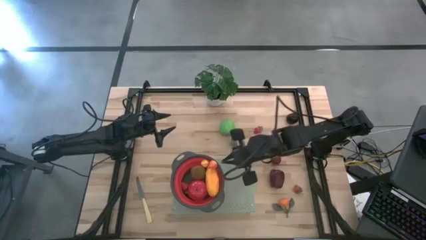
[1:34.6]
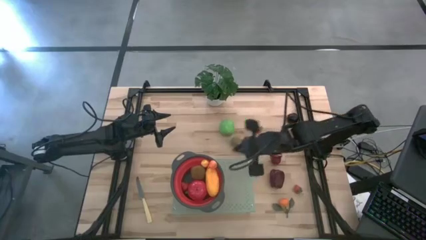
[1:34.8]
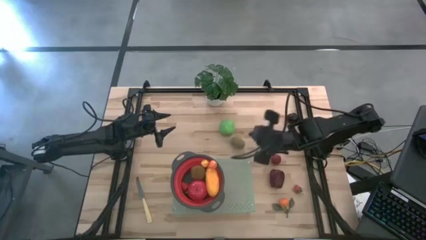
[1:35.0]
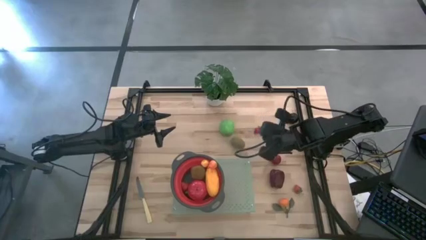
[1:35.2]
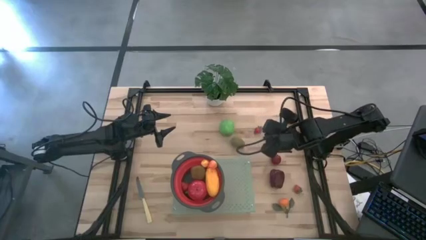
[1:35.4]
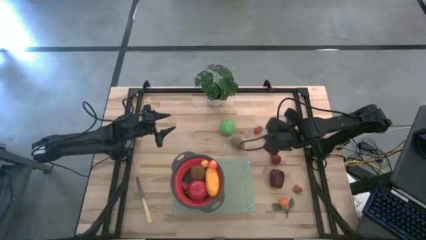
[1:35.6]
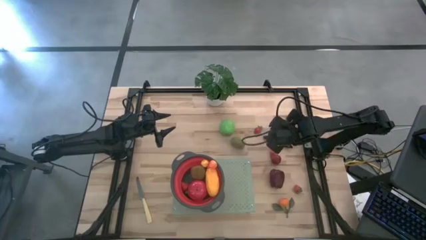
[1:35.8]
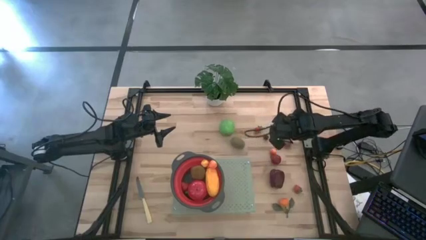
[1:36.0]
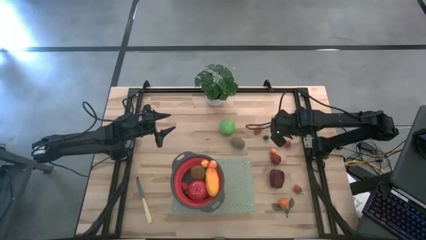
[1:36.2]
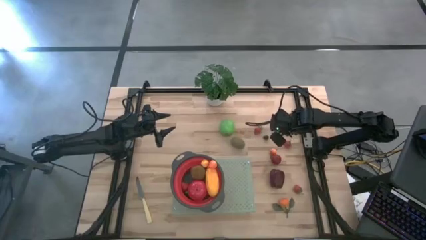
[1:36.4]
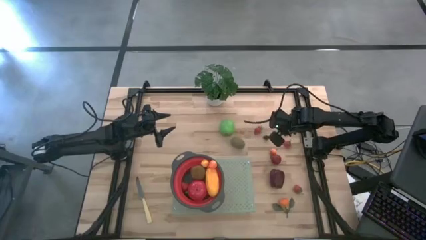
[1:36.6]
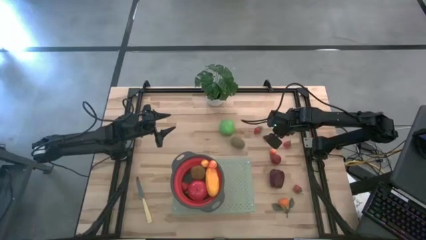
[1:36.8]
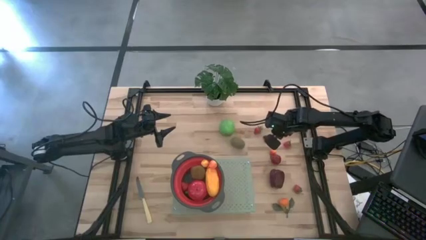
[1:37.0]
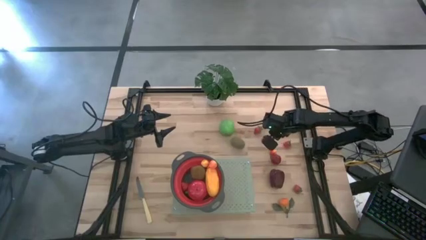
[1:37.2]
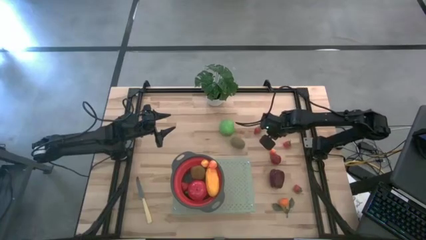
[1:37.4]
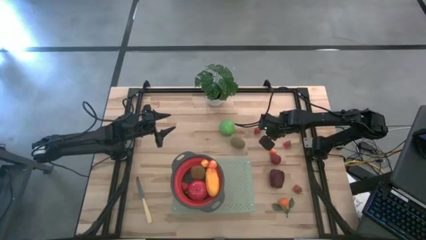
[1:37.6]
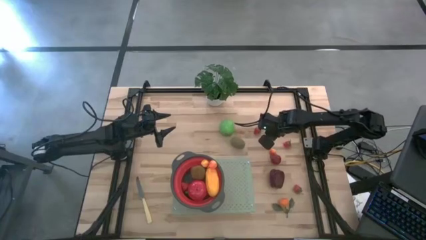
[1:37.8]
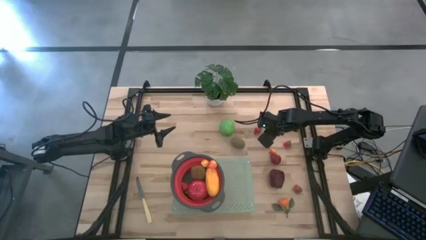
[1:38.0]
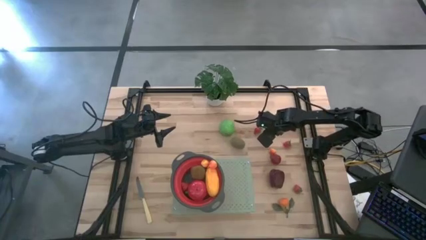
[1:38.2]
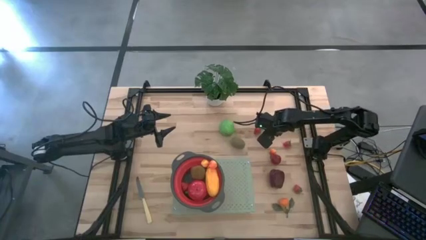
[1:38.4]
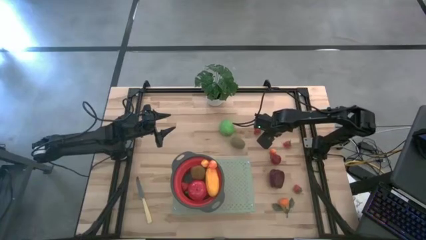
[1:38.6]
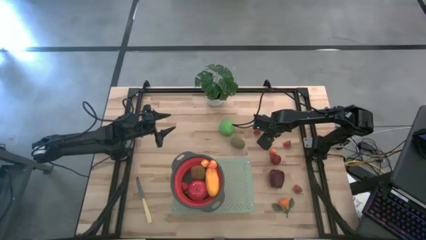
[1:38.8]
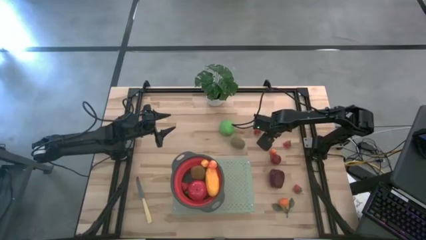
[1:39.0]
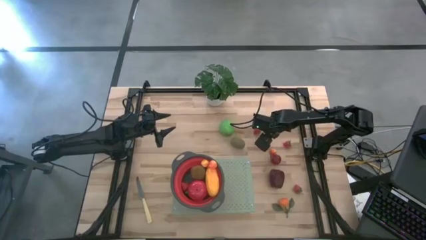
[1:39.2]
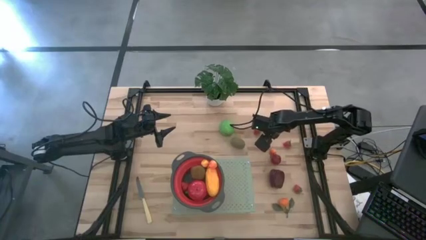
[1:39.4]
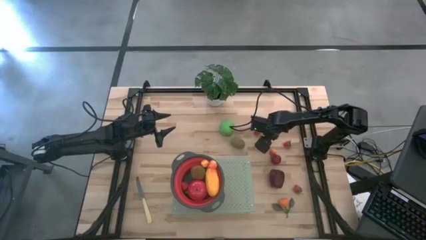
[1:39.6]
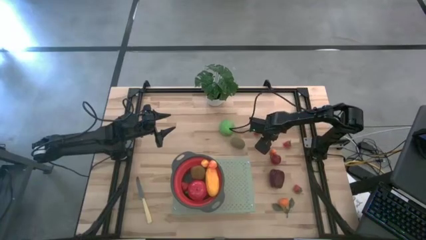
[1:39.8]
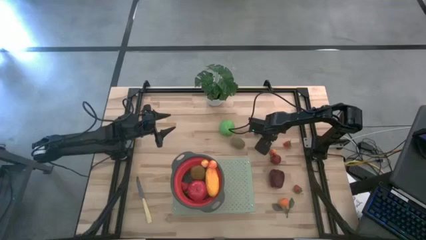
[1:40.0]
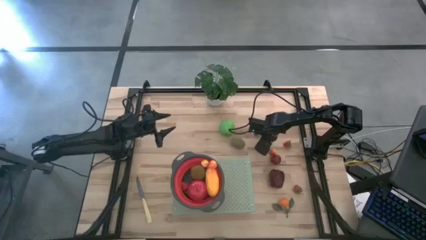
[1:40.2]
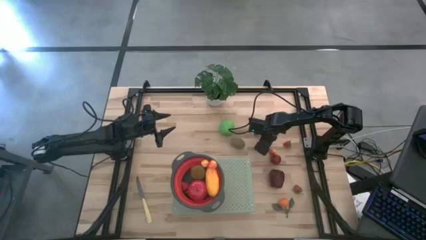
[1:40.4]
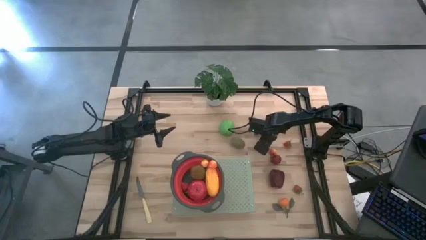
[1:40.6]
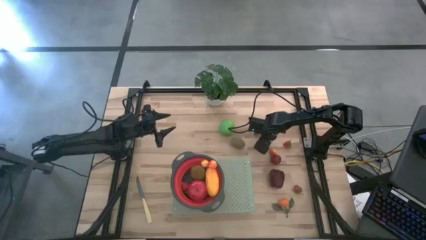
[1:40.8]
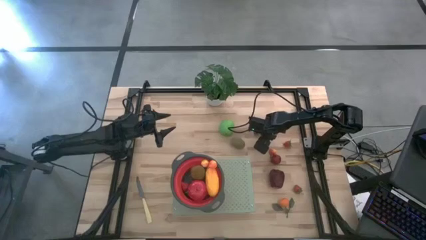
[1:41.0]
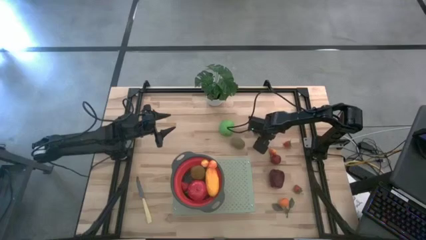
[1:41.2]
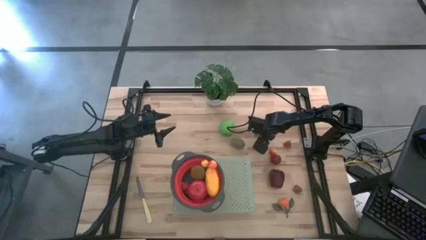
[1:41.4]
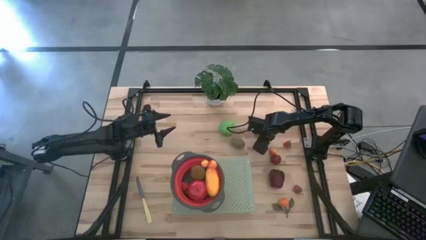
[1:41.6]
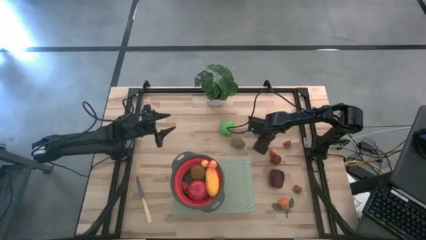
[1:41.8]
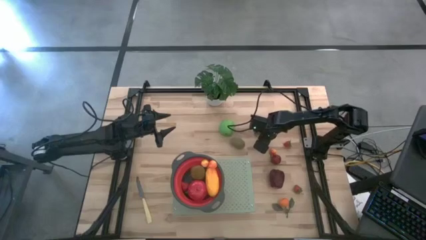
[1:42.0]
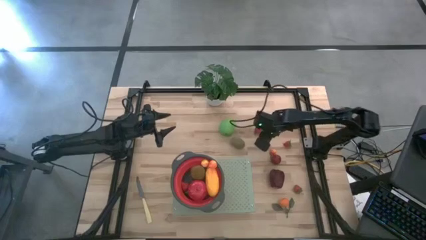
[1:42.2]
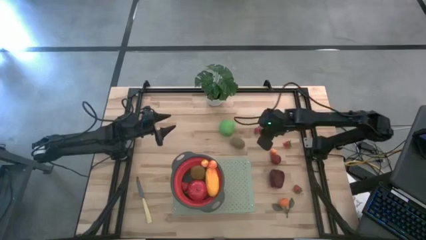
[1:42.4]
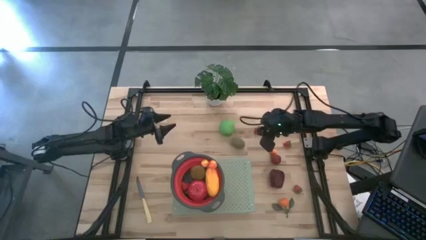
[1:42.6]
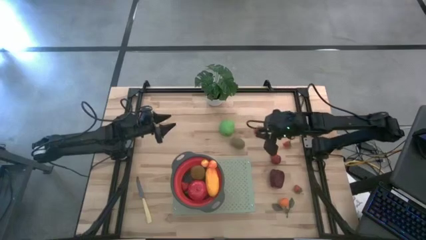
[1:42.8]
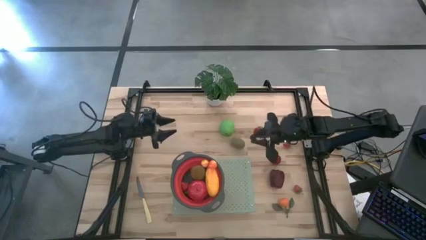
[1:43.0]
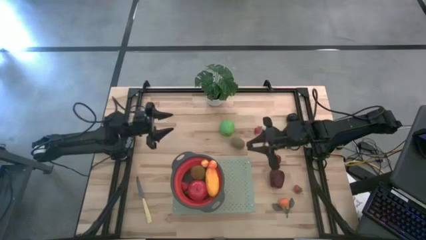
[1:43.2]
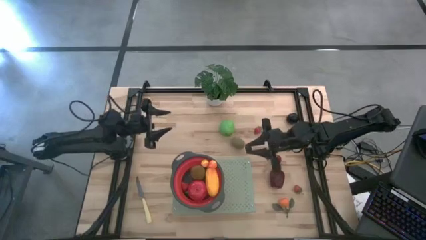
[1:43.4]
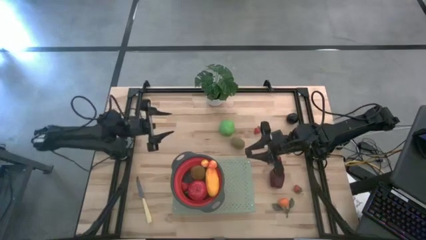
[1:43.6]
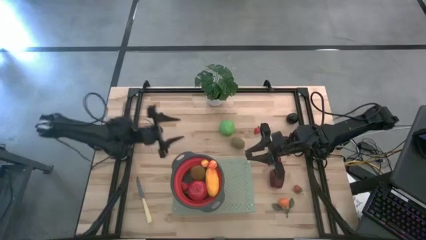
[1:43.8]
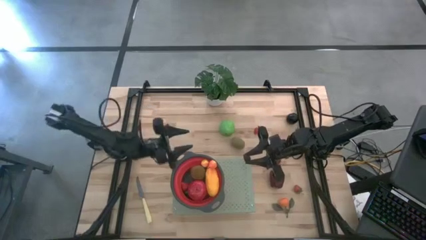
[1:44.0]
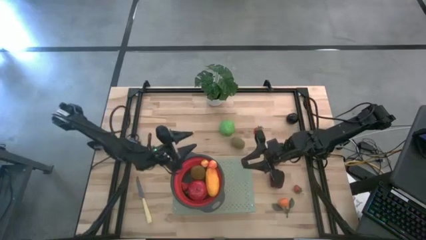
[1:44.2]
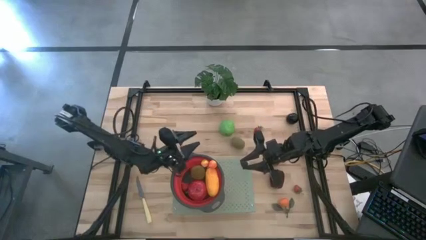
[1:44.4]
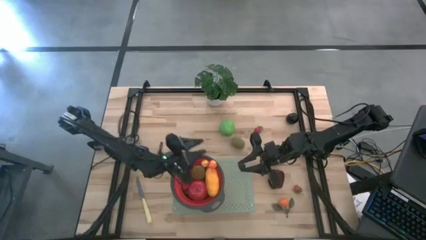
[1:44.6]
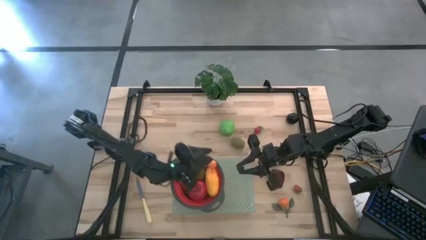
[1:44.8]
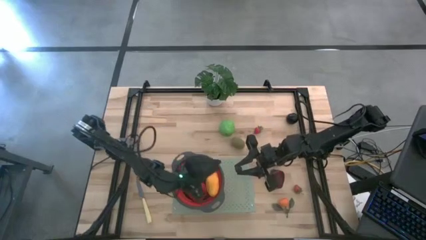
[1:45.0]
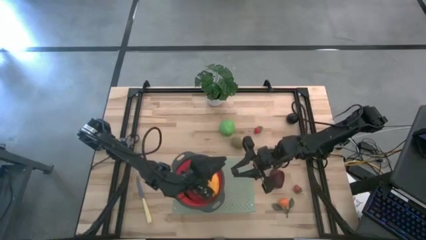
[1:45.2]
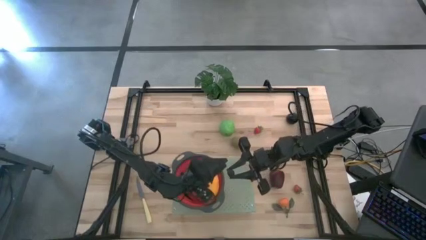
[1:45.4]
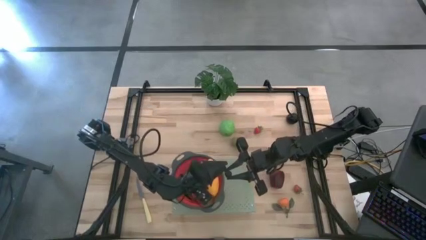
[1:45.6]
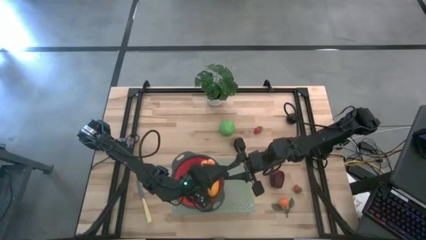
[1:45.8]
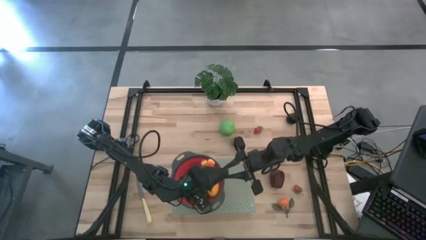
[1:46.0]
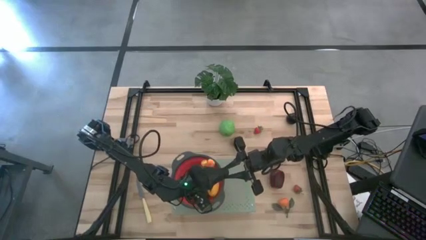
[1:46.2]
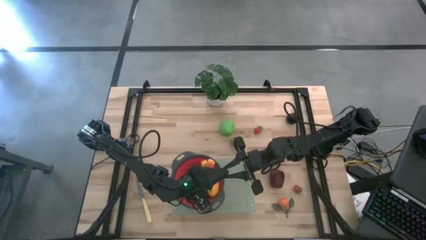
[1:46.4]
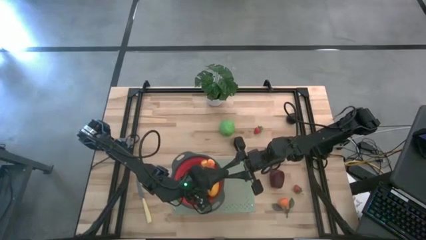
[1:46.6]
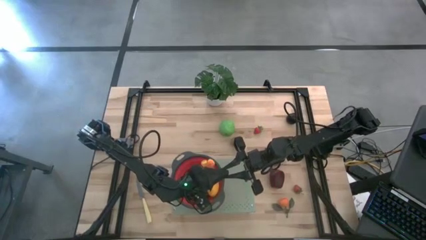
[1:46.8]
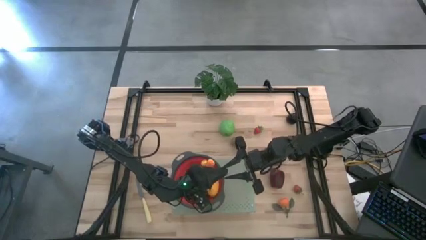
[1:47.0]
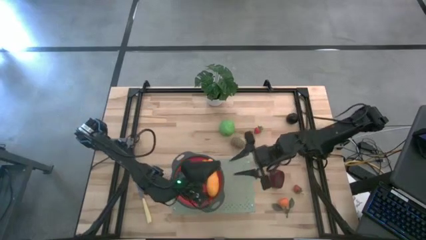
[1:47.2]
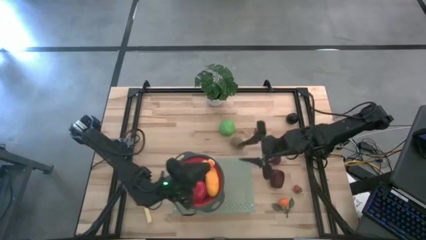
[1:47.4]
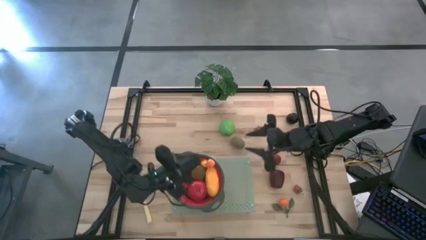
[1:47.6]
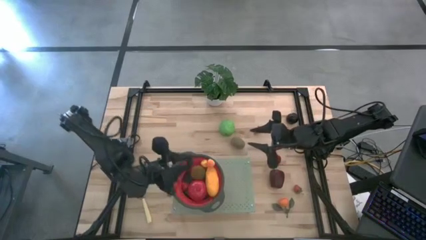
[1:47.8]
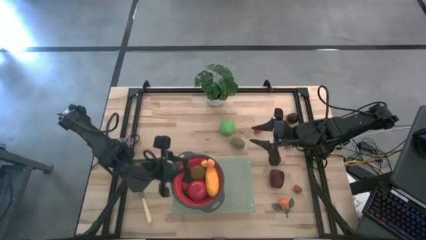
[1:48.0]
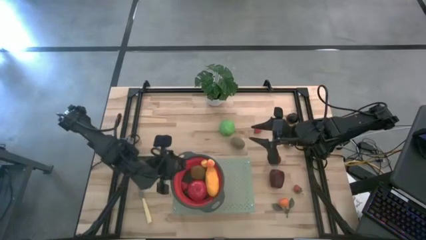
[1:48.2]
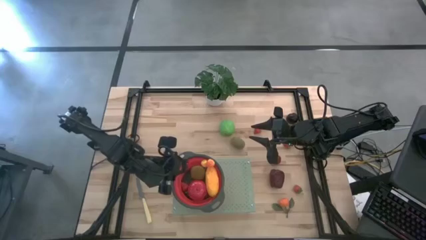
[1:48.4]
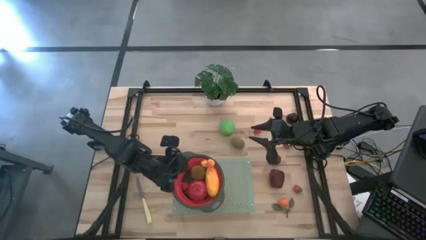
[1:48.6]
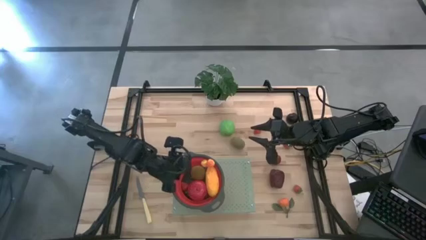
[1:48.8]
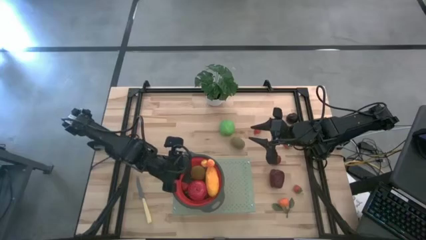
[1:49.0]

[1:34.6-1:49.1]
Task: Pick & Place Fruit
Put the blackberry into the red strainer

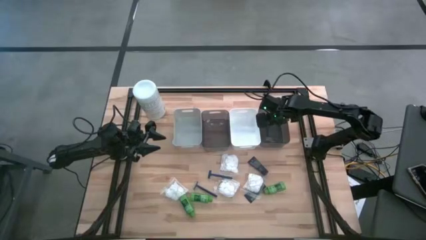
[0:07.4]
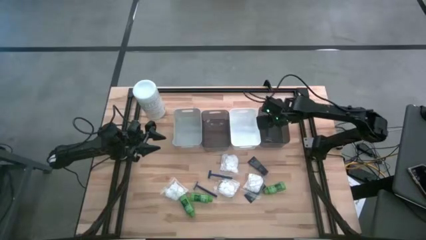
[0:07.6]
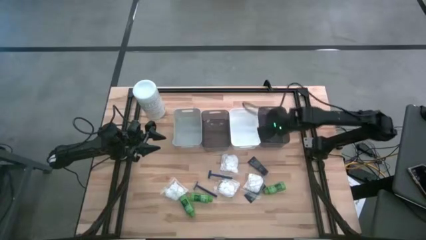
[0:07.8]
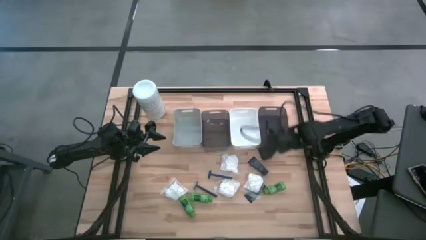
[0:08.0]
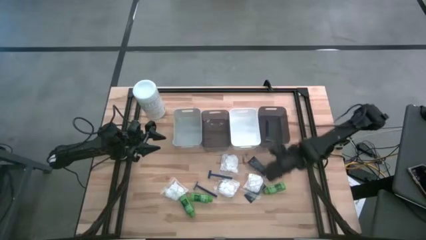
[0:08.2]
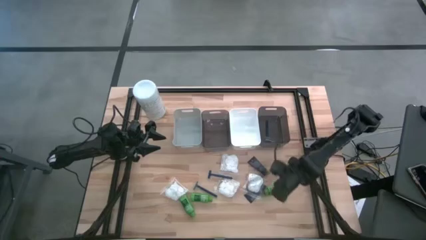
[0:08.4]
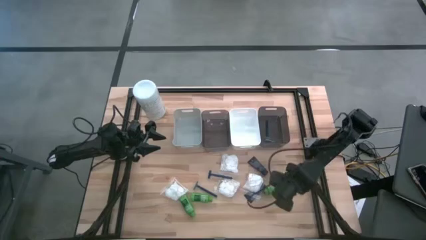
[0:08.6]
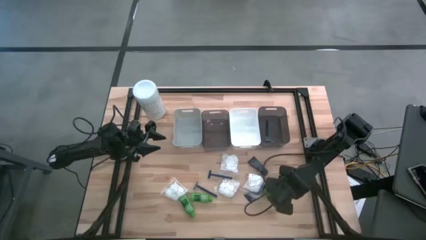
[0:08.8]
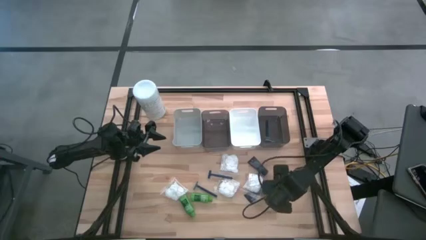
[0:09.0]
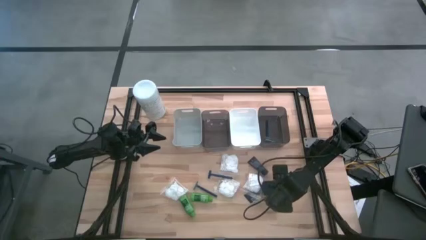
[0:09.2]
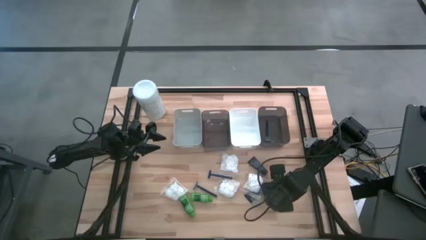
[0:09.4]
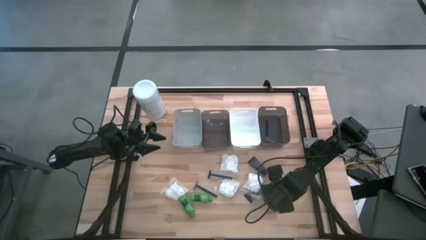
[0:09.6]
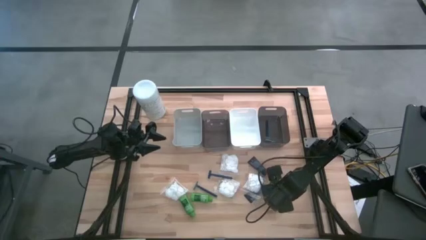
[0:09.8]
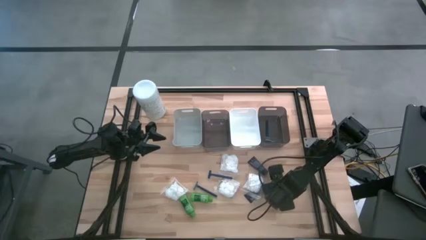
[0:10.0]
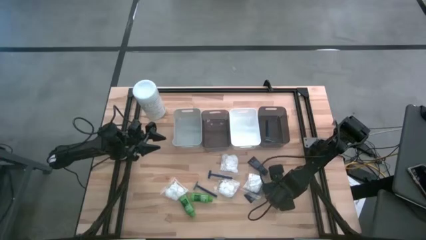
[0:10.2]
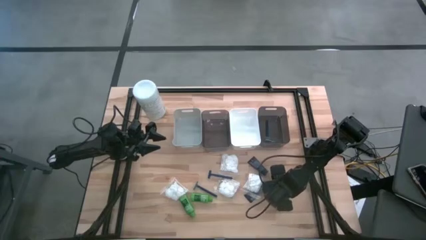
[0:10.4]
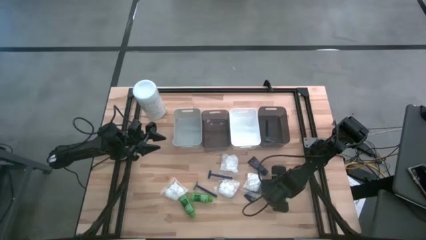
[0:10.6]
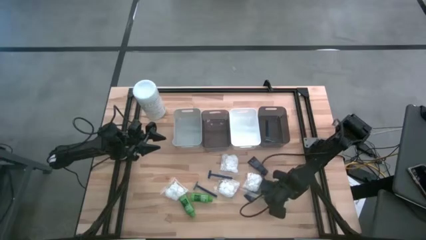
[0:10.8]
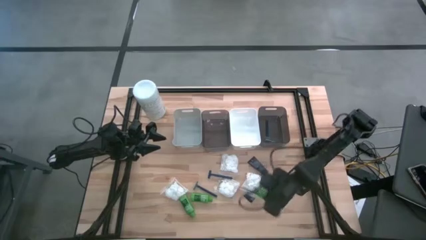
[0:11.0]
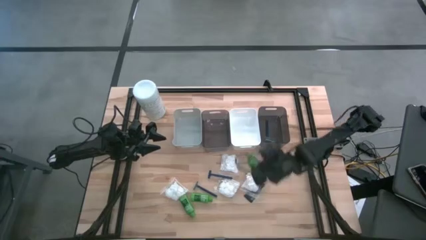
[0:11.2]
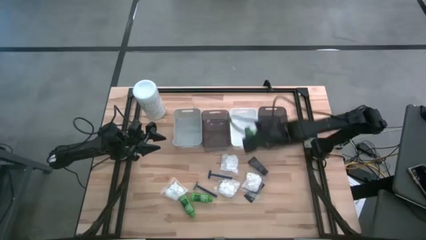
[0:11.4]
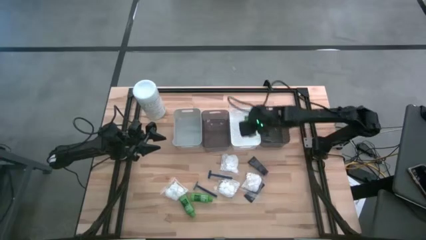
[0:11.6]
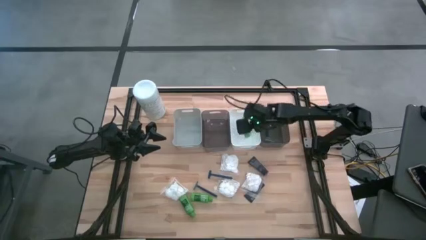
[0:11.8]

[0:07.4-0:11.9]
Task: Pick & Place Travel size toiletries
Put the right green shampoo into the white bin
